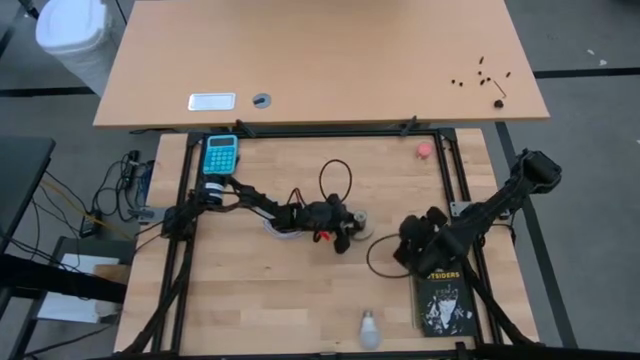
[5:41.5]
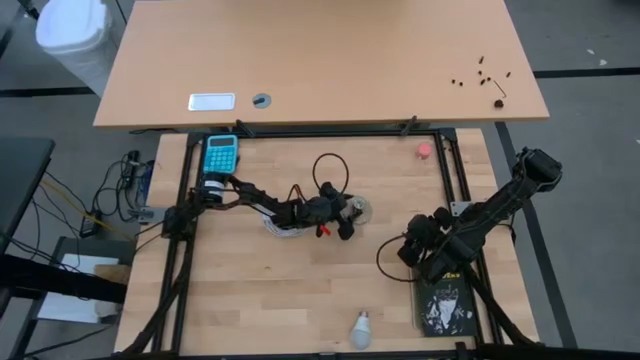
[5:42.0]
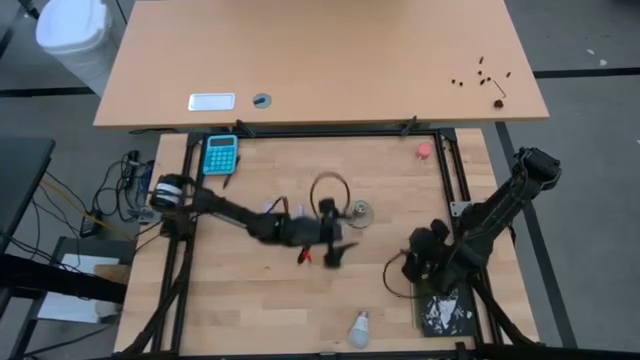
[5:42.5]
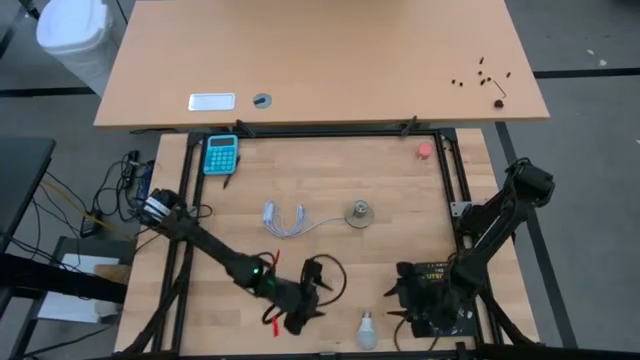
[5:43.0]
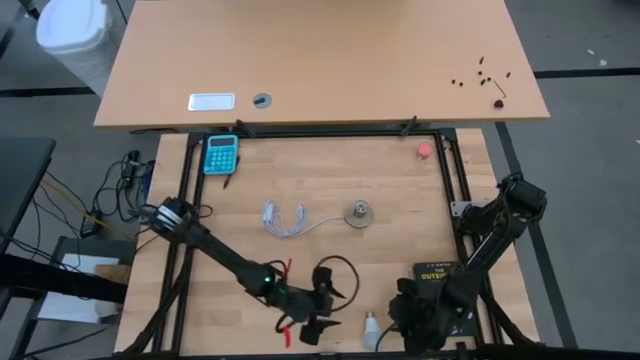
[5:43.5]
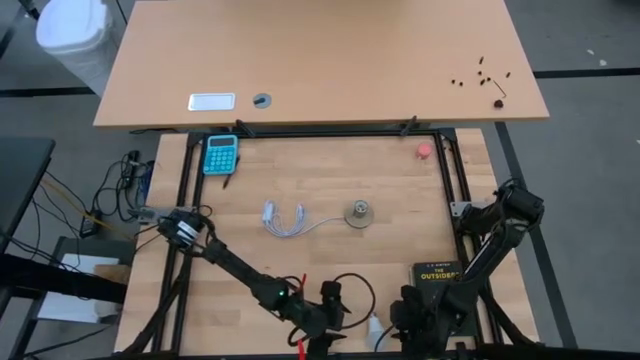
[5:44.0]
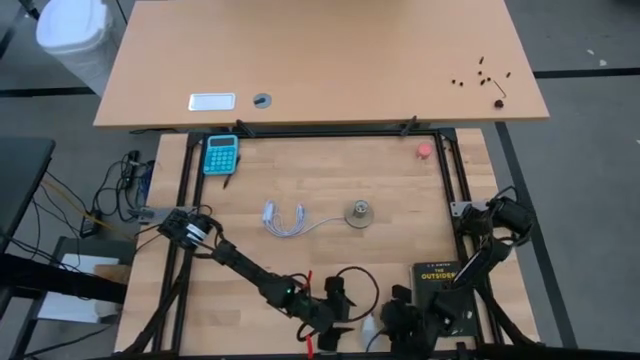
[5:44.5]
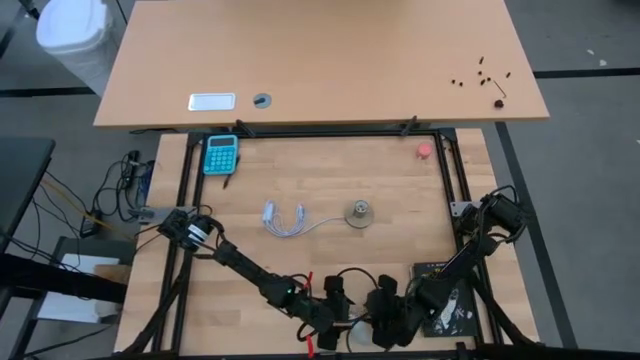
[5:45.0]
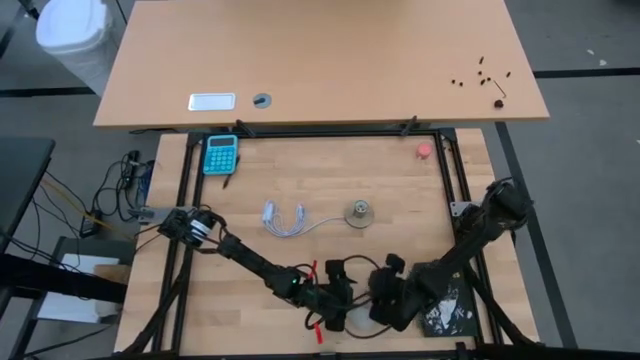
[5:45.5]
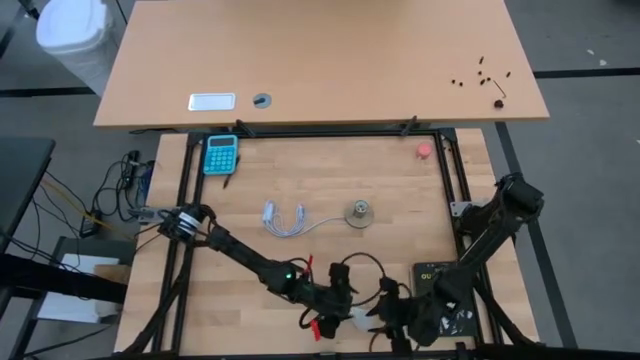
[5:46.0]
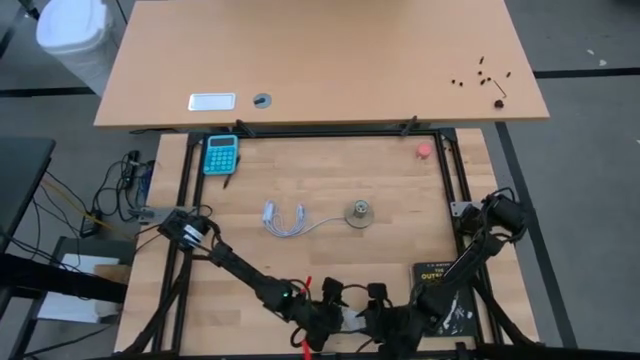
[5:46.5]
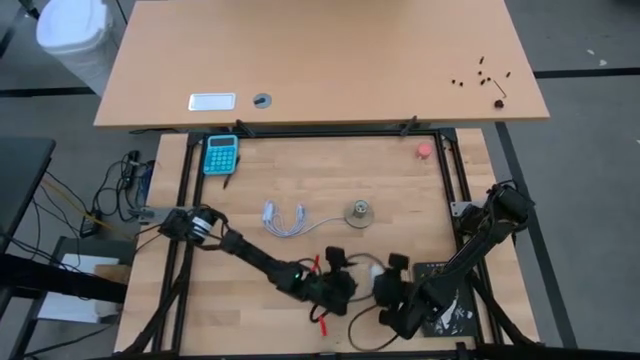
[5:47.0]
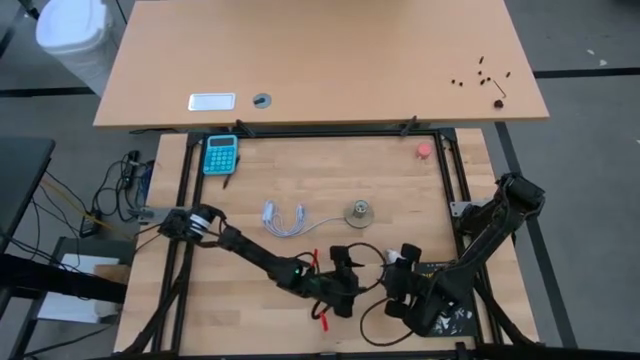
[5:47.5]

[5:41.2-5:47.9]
Task: Screw lightbulb
Move the lightbulb to the middle right side of the table

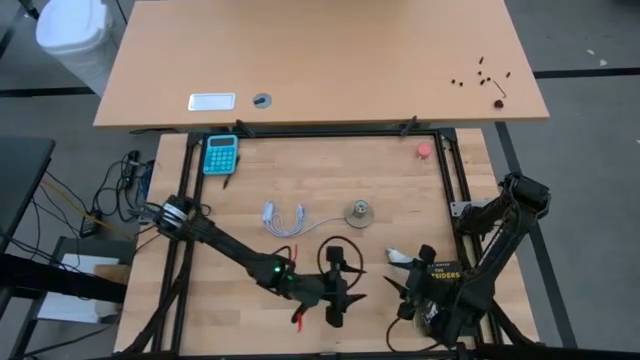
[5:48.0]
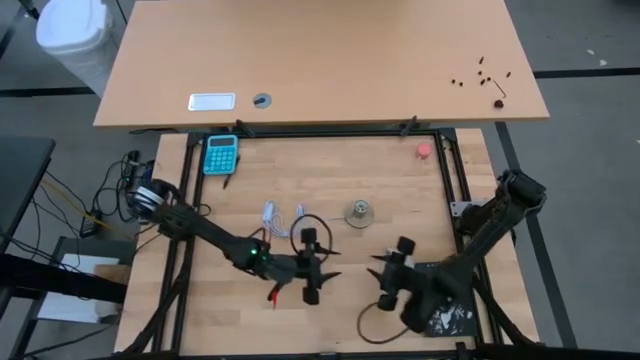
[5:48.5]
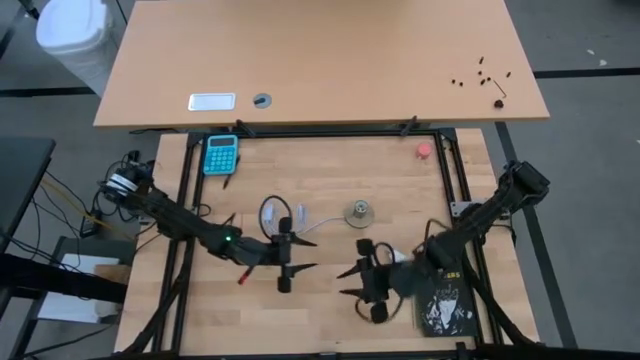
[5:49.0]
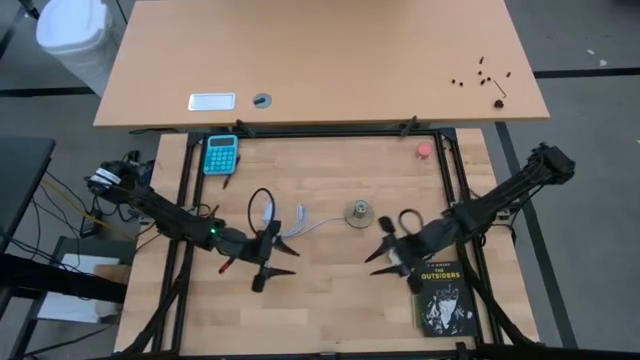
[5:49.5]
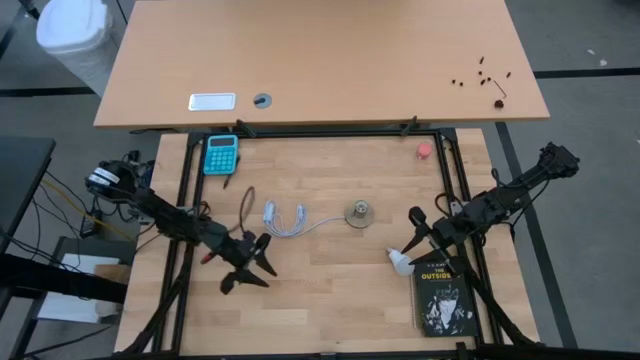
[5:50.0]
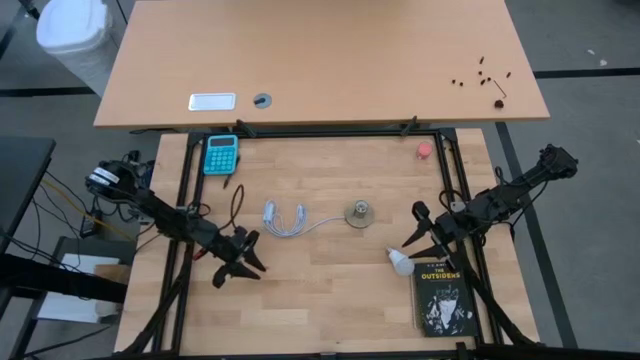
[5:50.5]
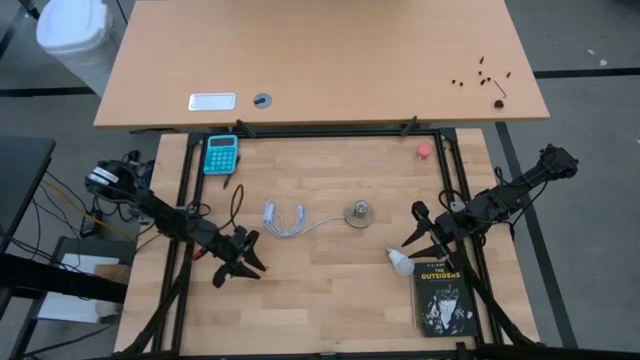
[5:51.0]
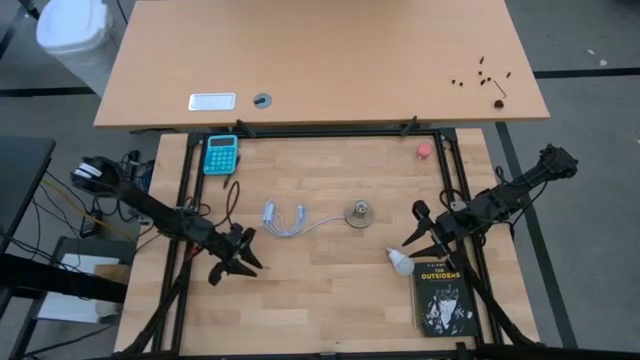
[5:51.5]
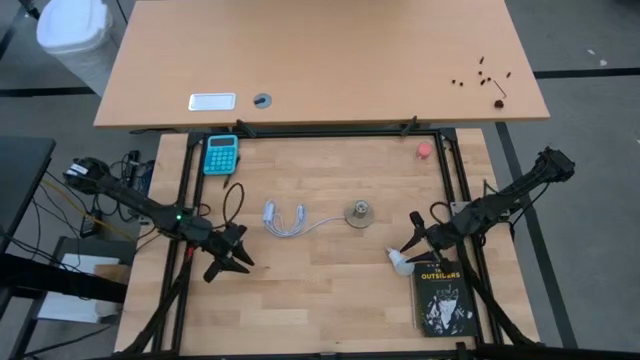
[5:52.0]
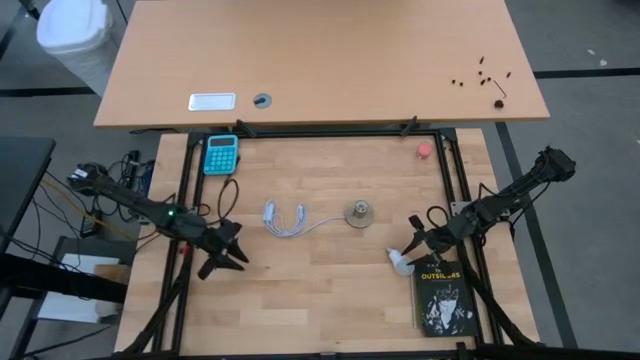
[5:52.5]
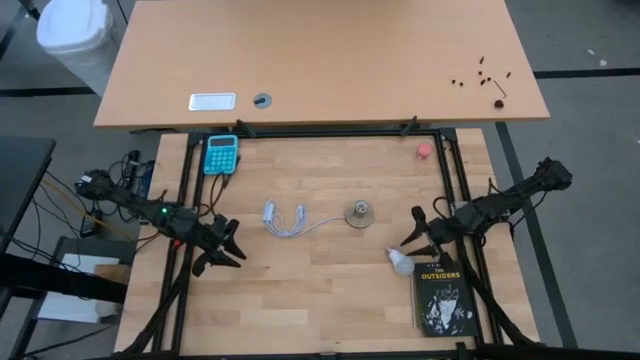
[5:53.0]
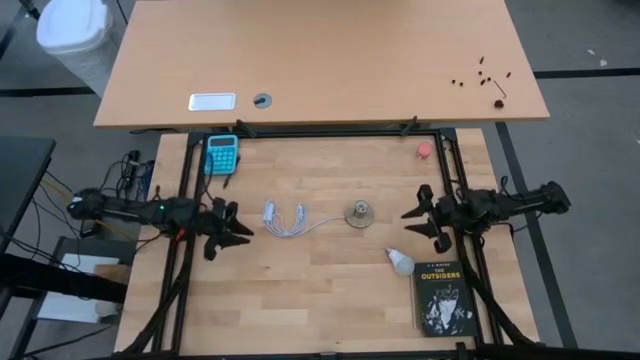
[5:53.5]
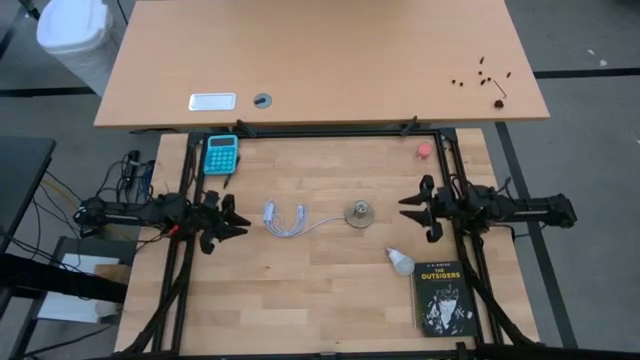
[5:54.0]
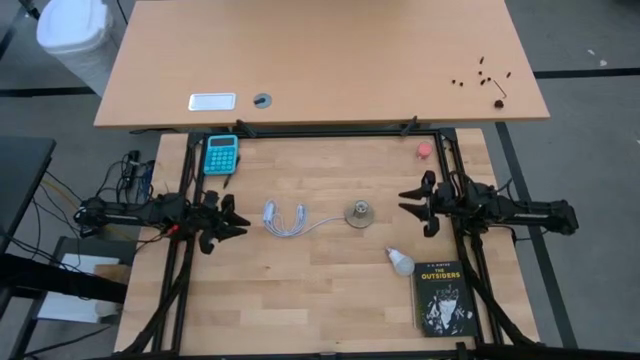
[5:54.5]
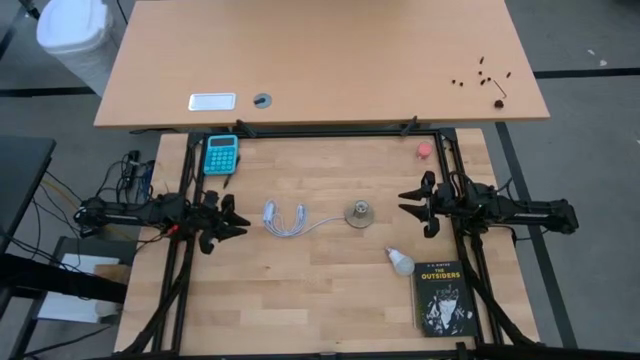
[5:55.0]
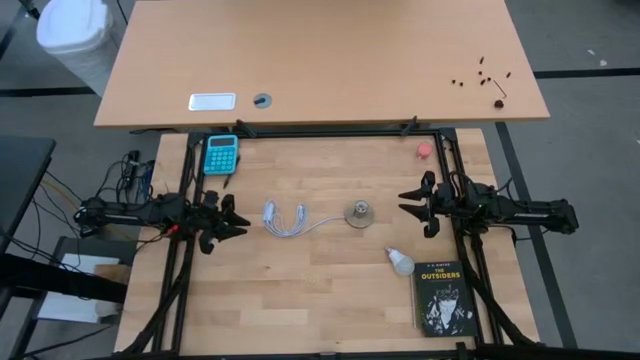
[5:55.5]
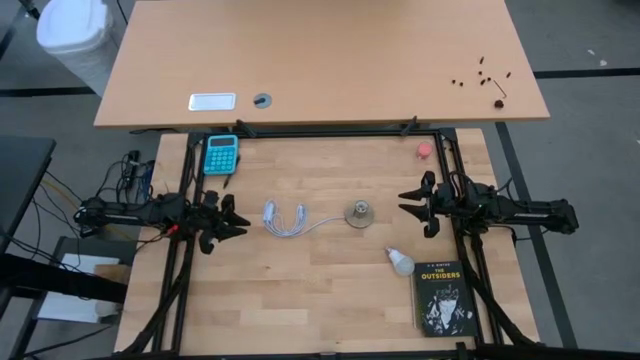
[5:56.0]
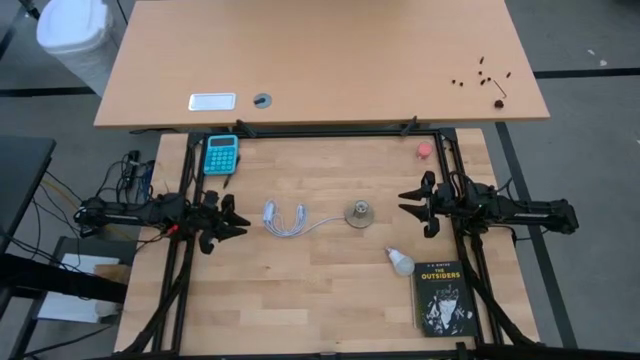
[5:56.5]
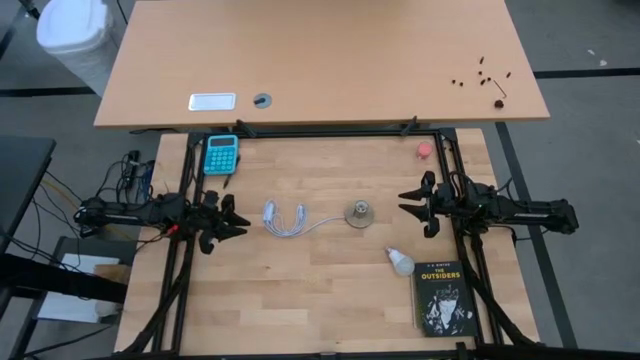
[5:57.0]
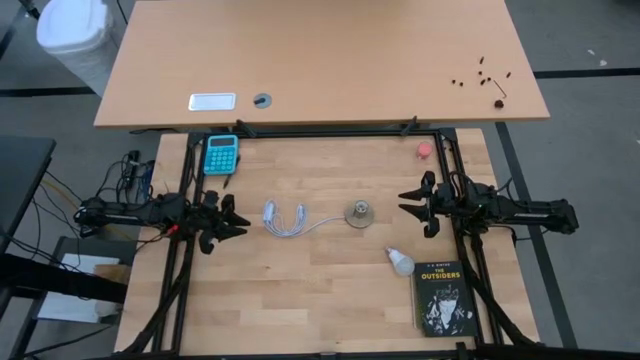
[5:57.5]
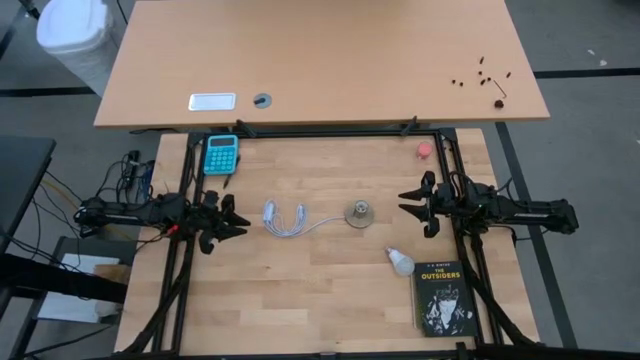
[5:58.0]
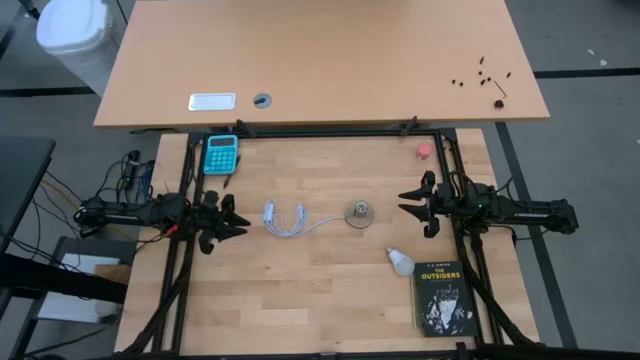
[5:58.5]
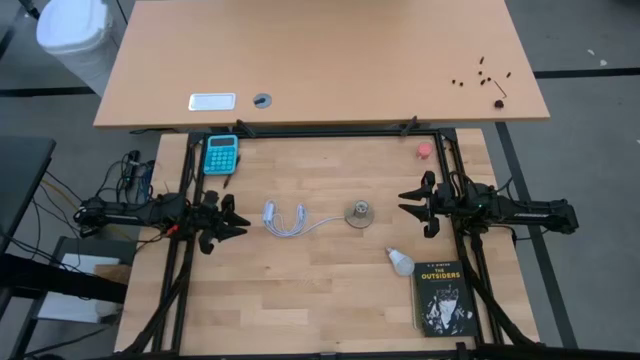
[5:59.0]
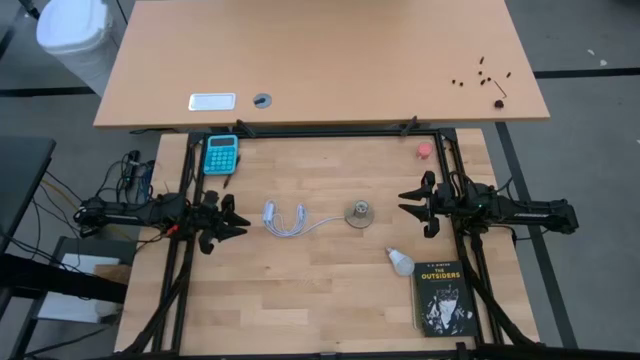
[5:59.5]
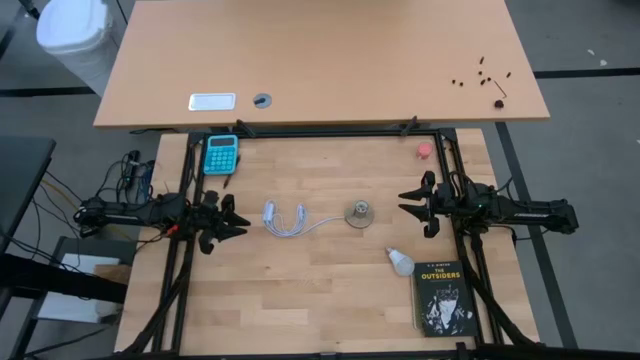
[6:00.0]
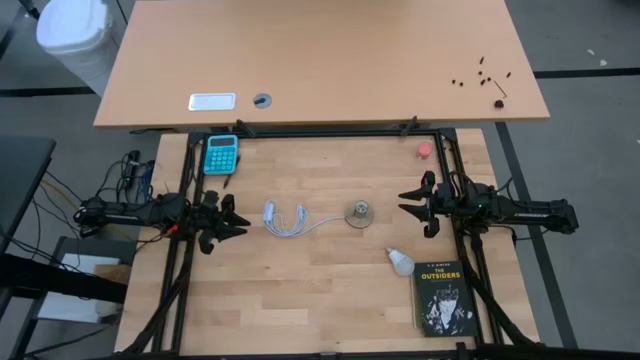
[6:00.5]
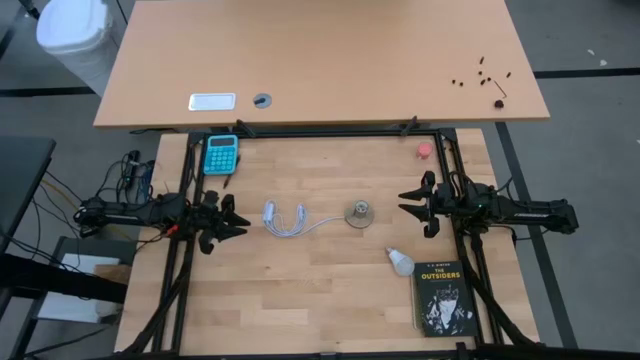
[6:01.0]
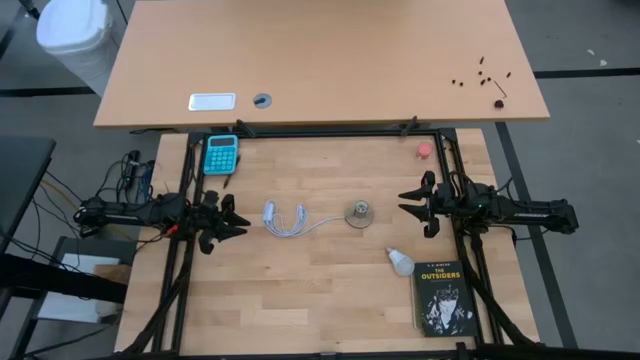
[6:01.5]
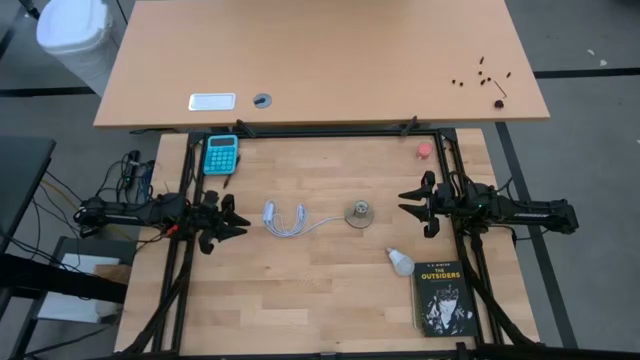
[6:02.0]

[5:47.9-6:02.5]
Return to Home Position
